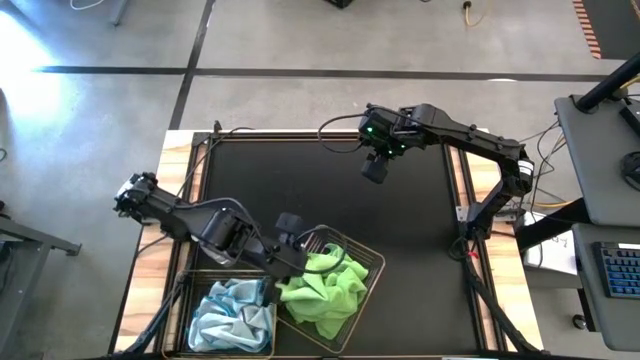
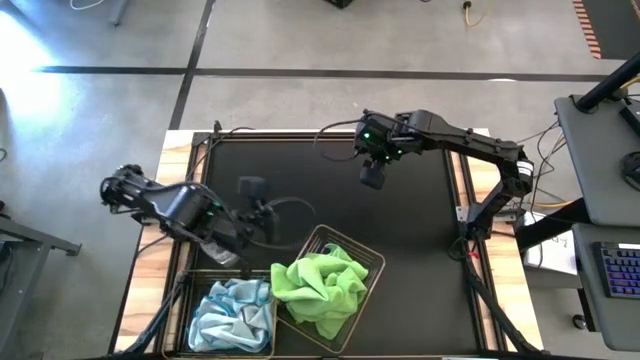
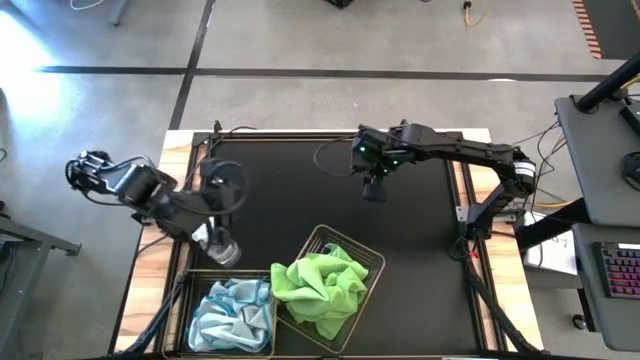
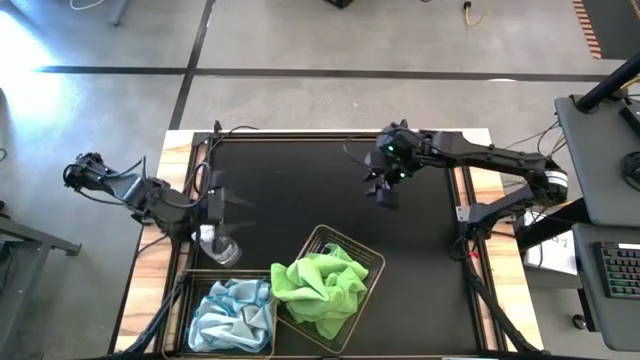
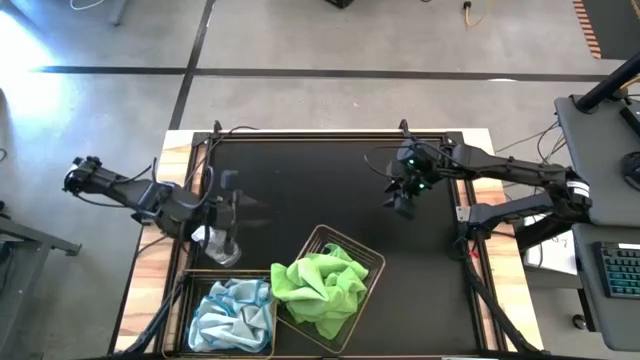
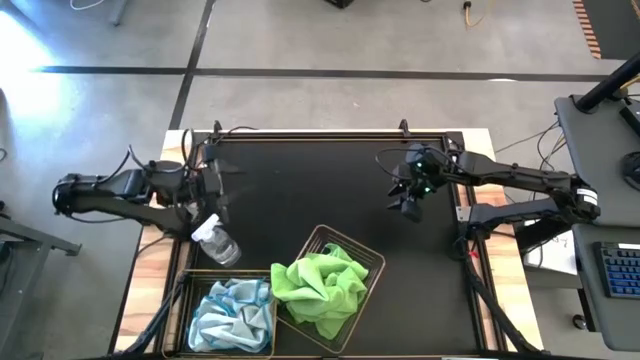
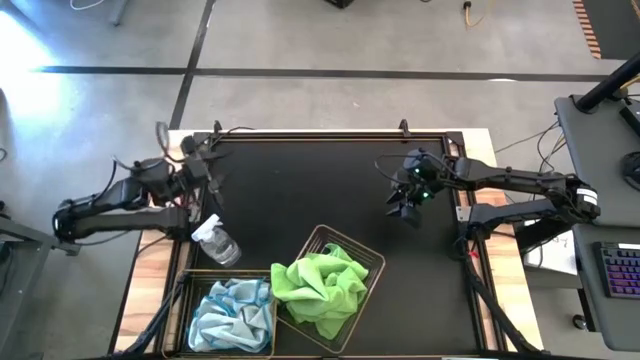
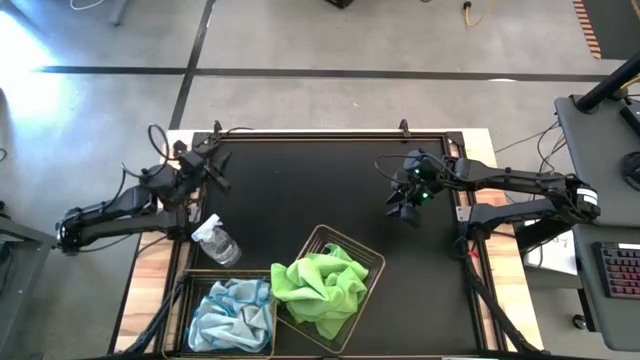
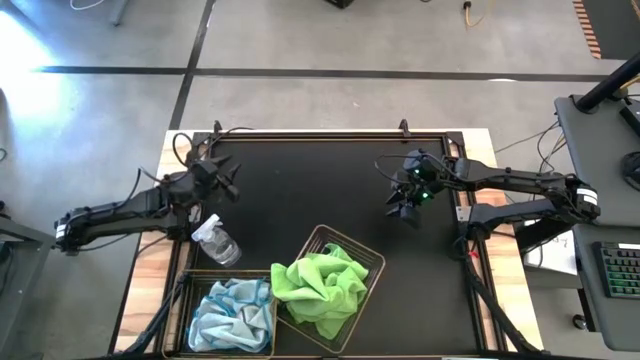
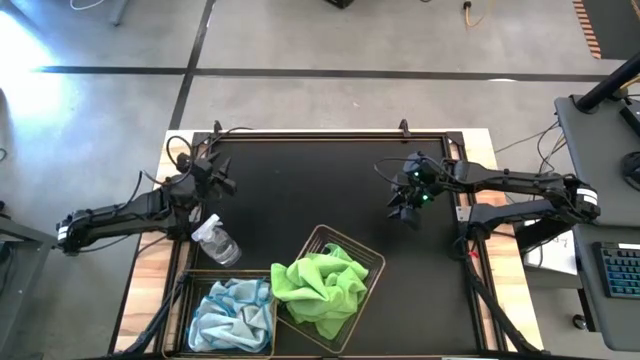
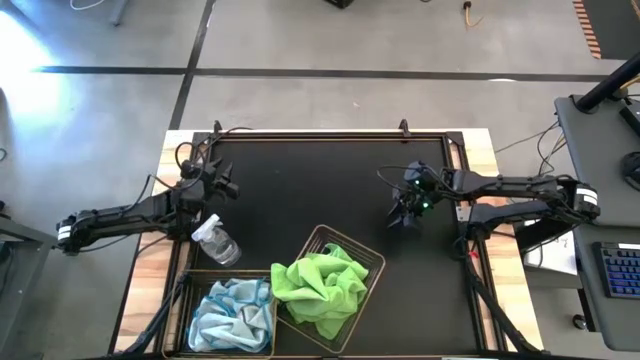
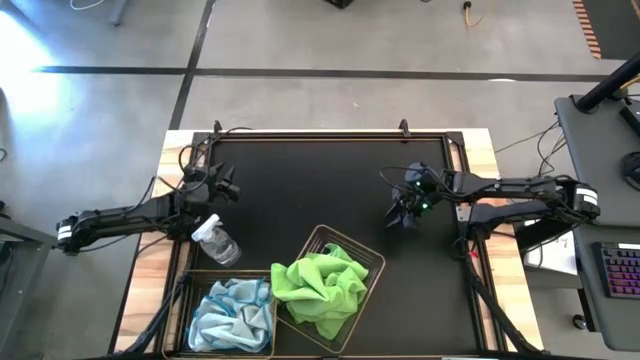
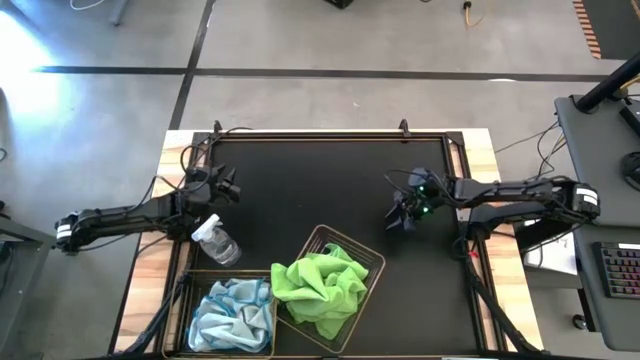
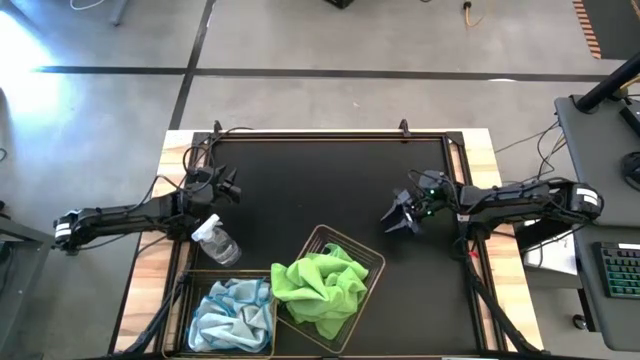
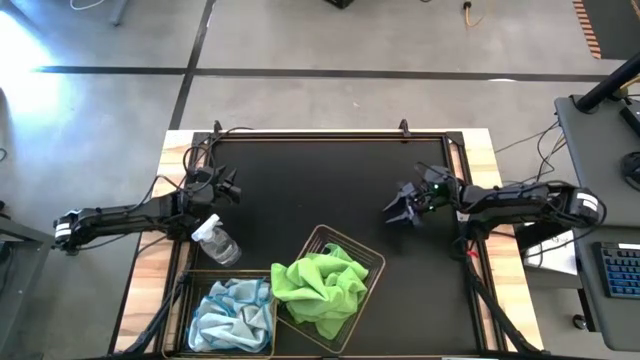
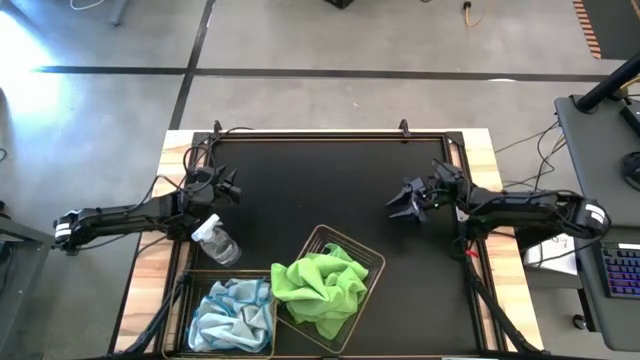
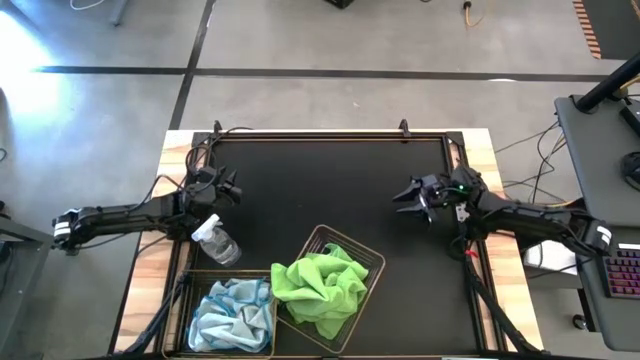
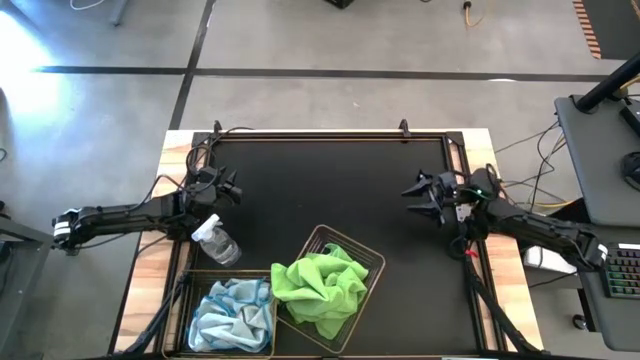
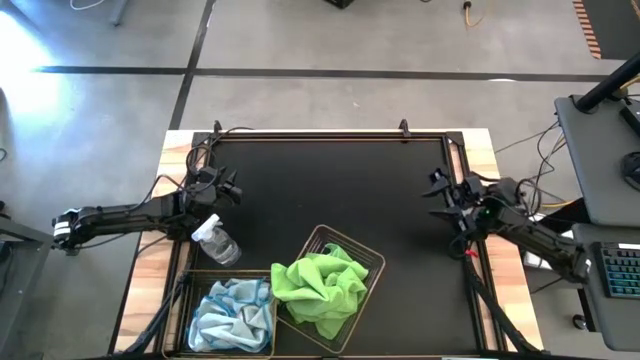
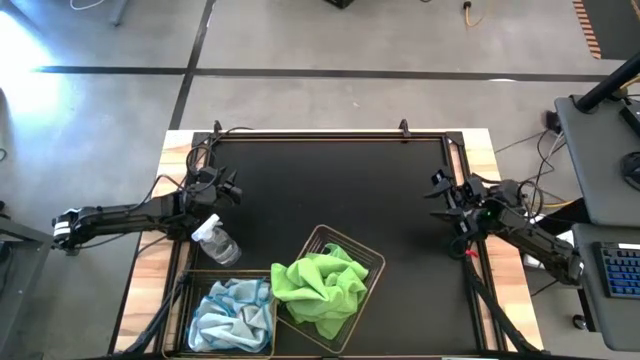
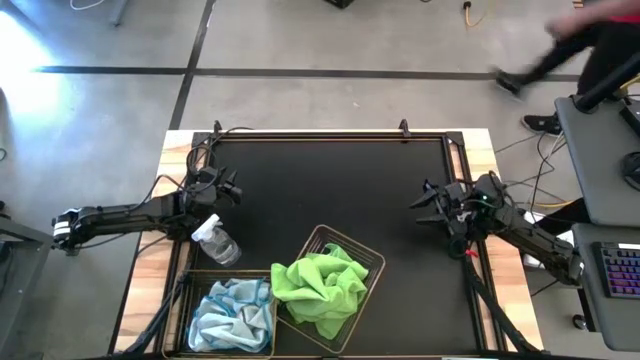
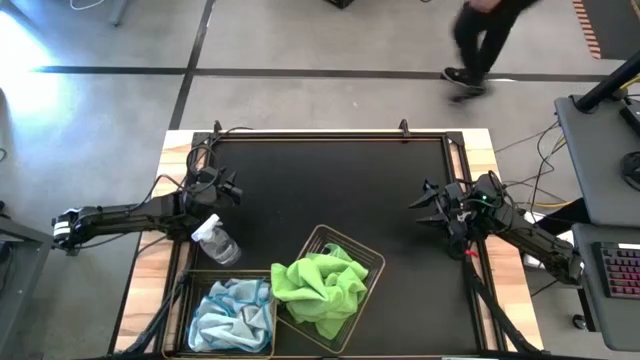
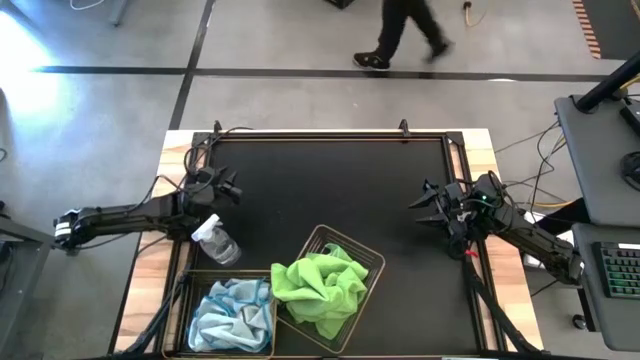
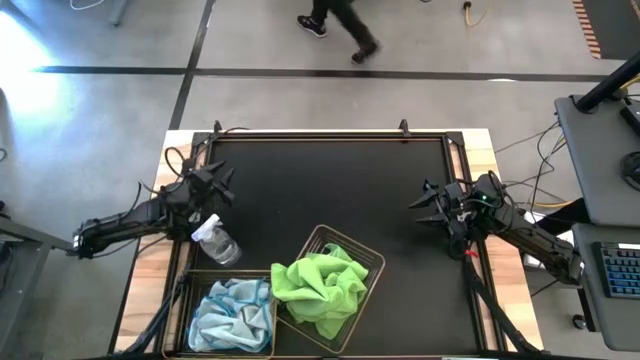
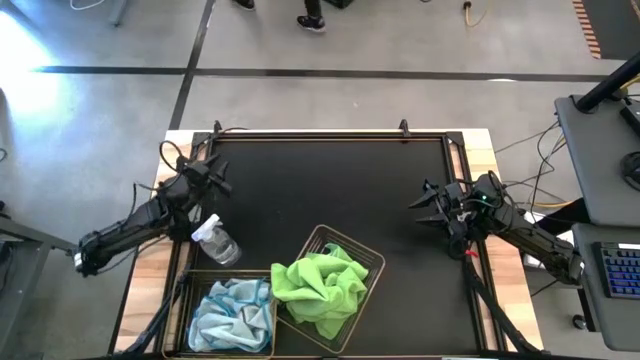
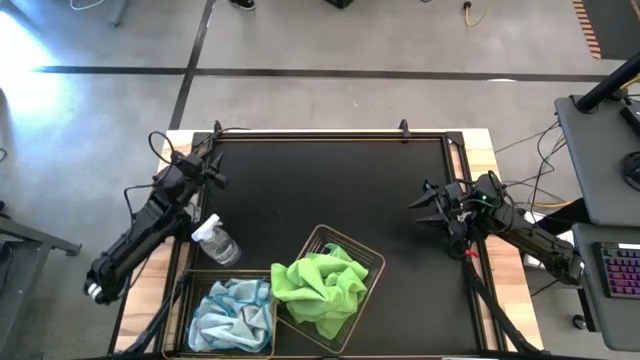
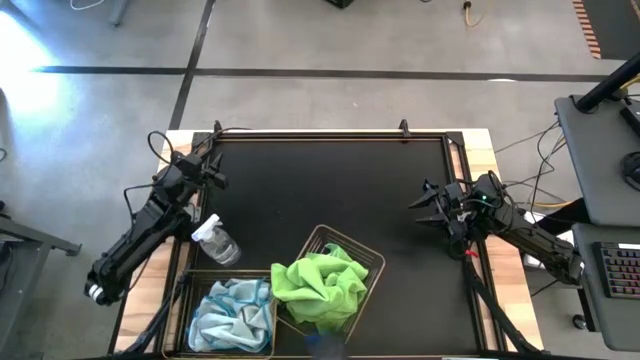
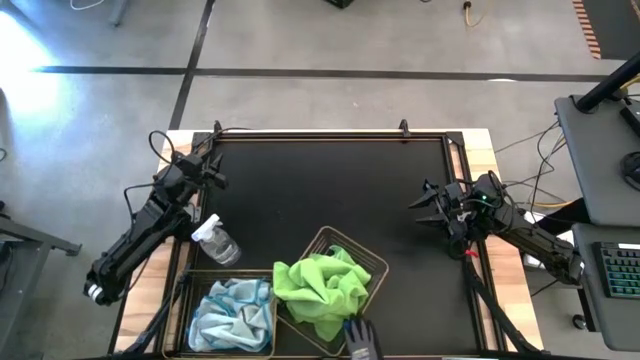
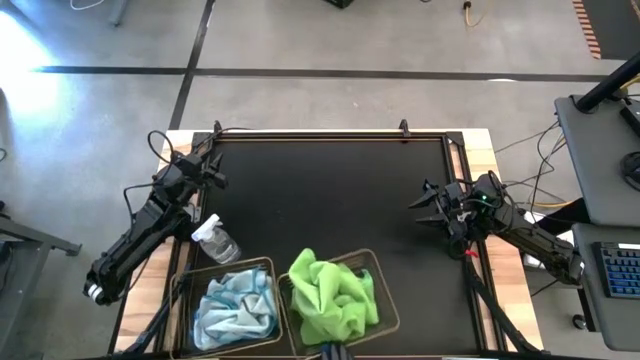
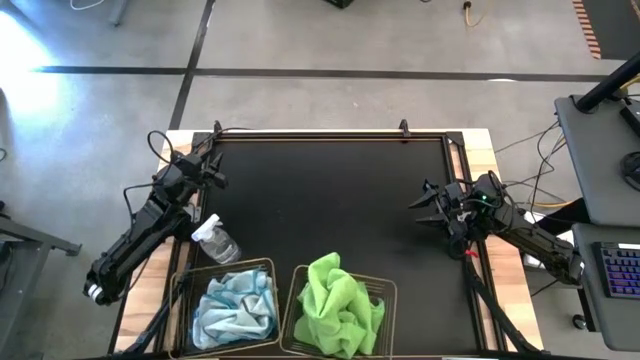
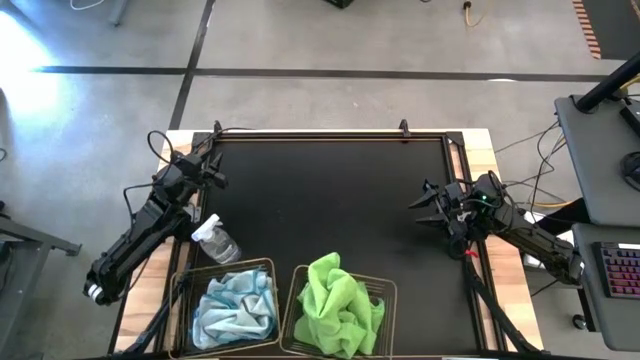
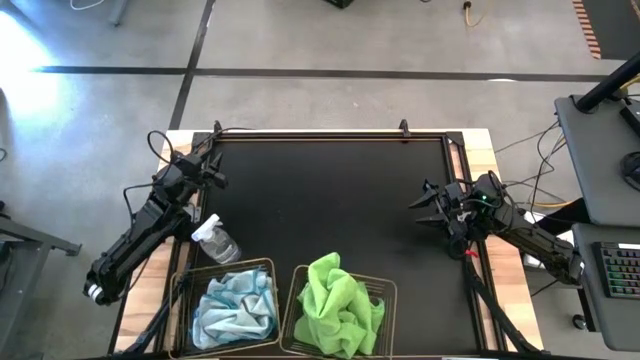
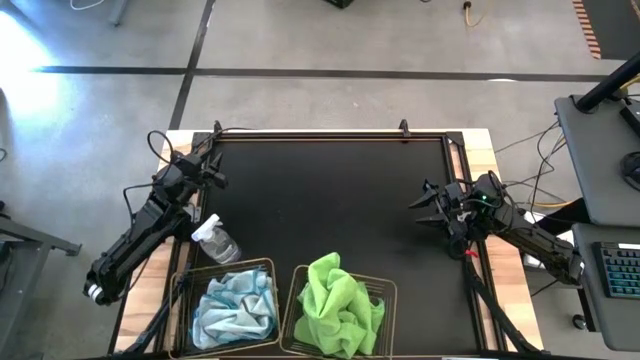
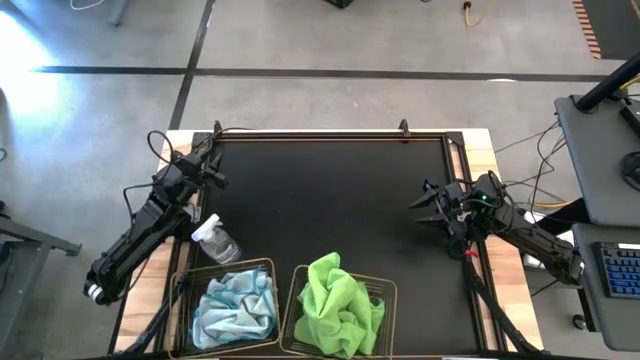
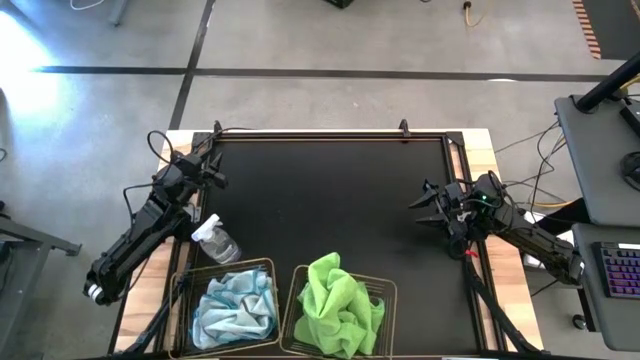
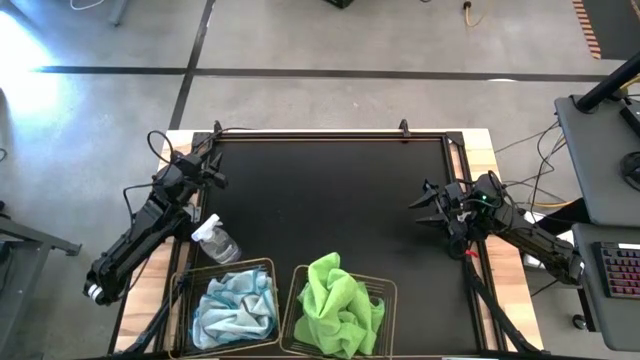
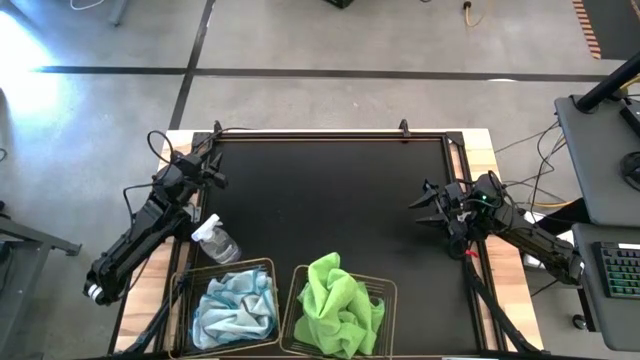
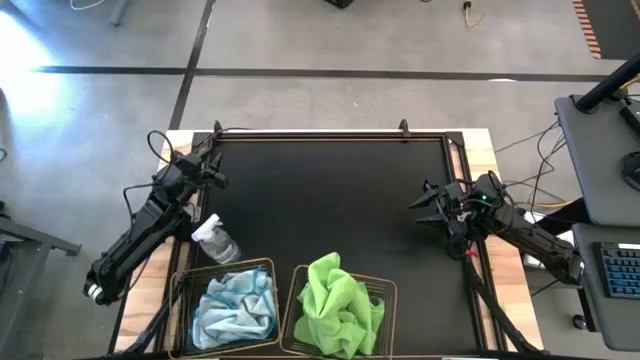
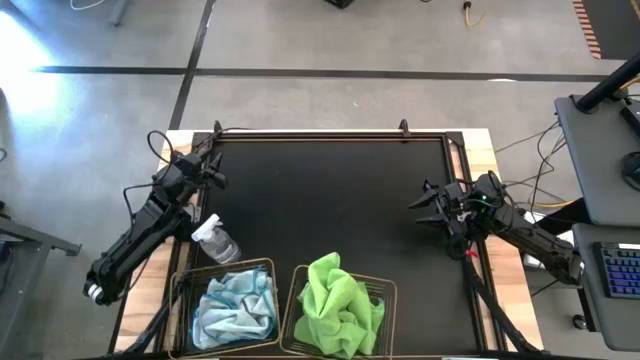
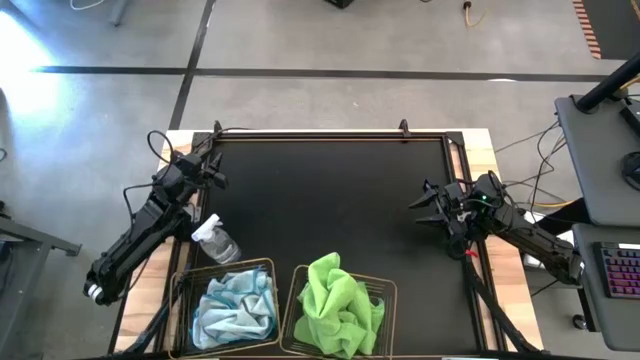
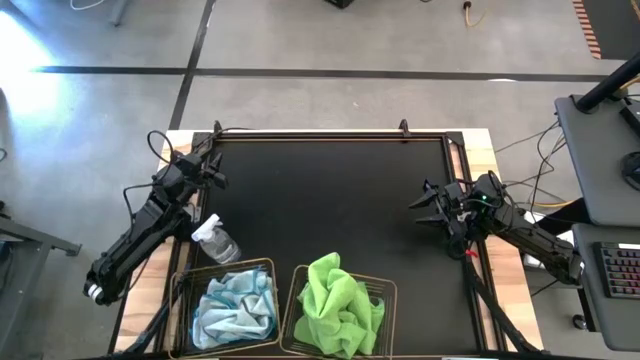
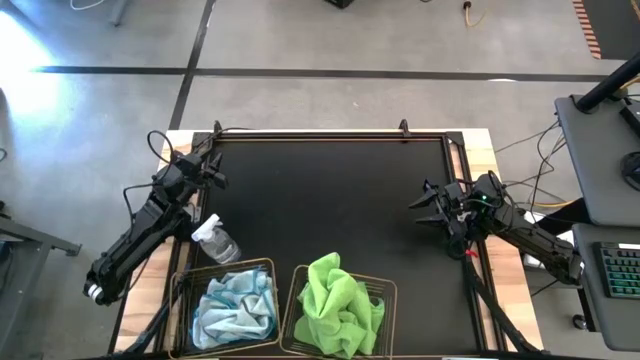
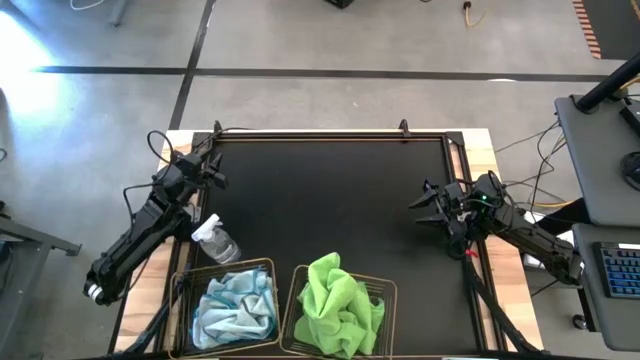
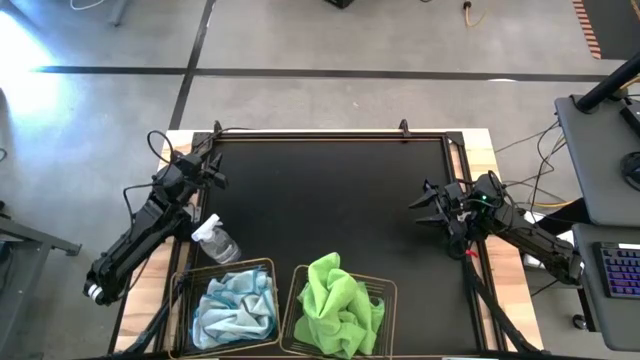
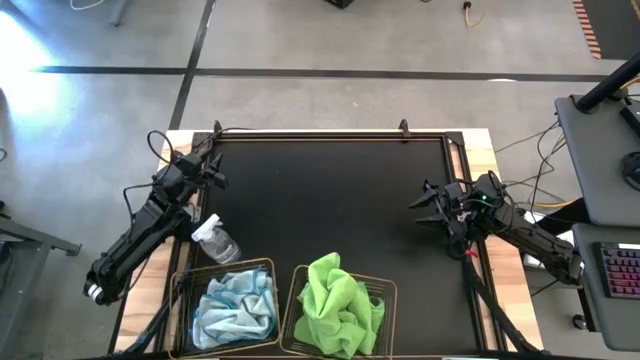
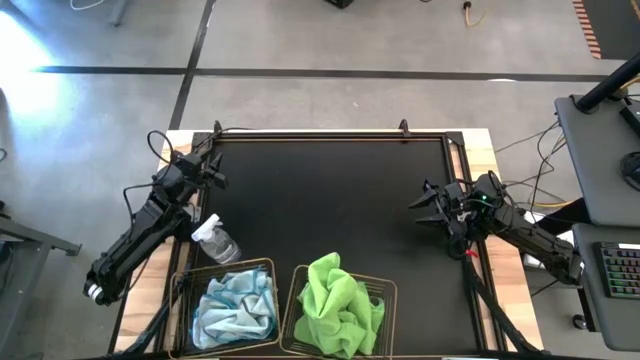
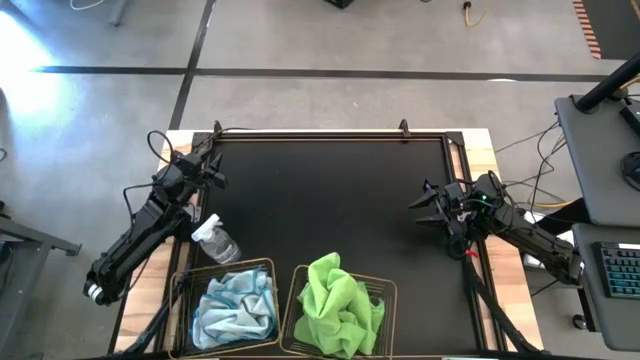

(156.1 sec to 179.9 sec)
Task: Sort microfiber towel by color & place in baskets
Return to Home Position
